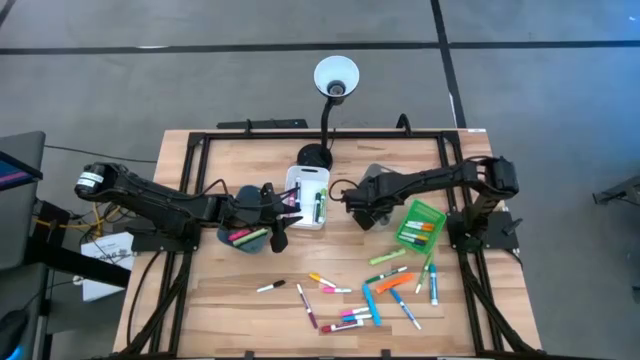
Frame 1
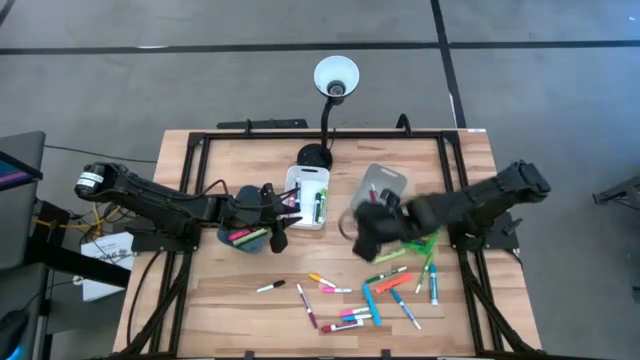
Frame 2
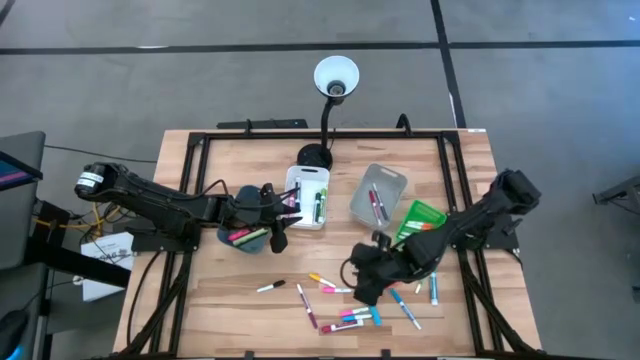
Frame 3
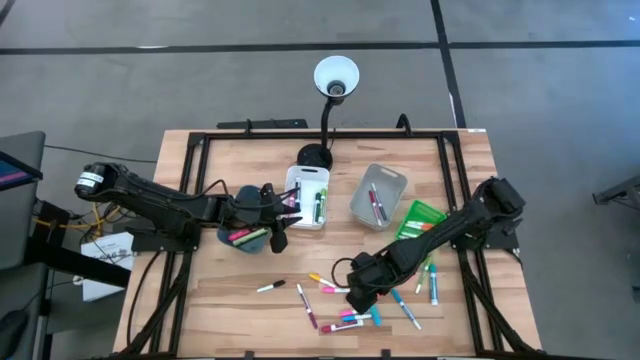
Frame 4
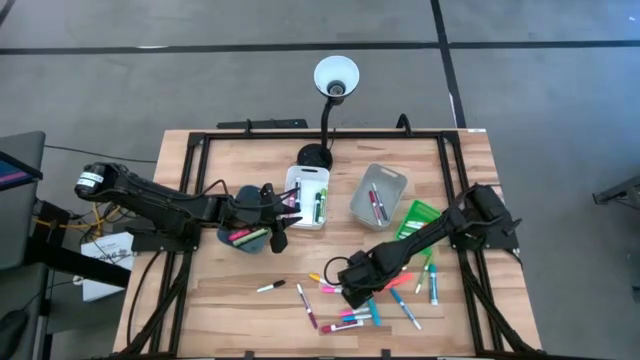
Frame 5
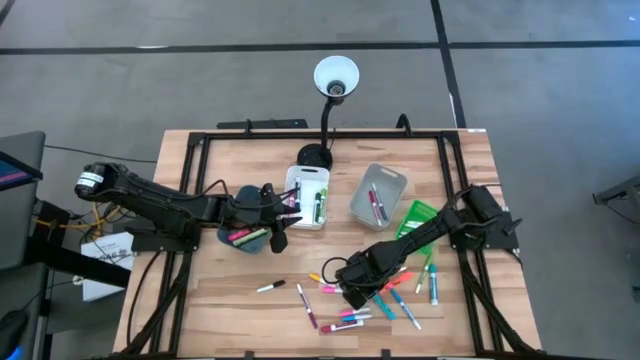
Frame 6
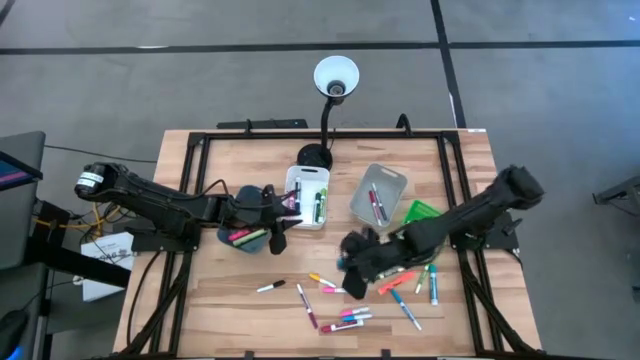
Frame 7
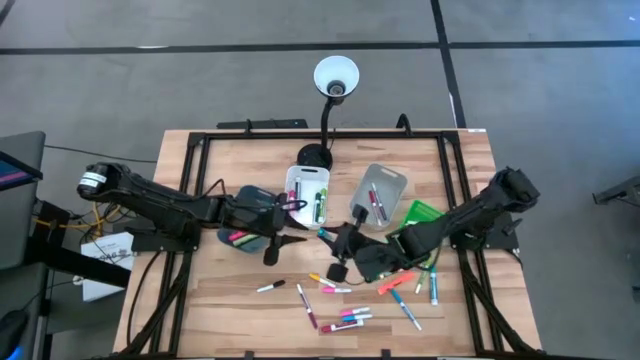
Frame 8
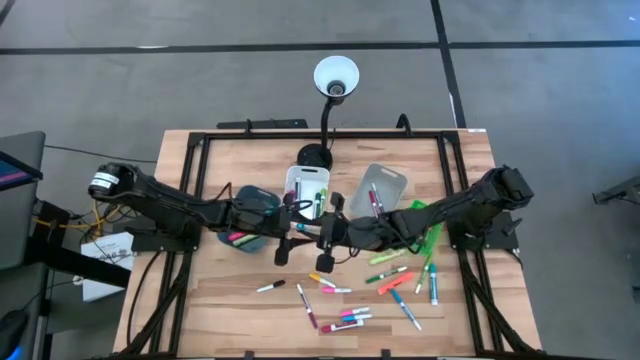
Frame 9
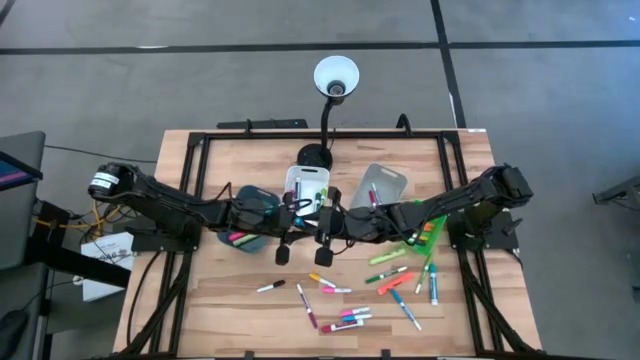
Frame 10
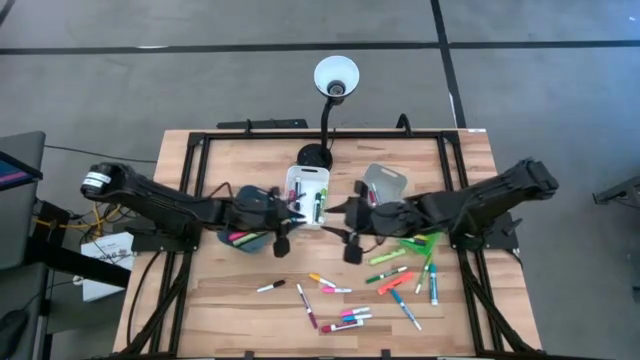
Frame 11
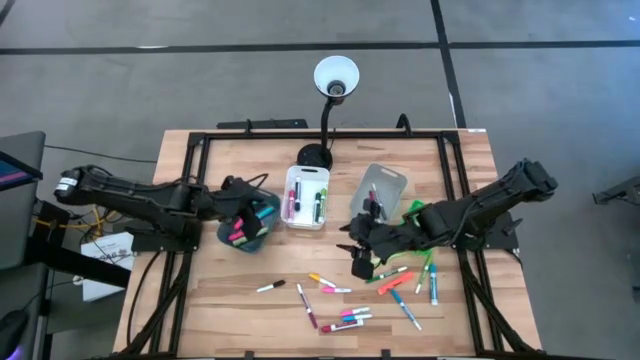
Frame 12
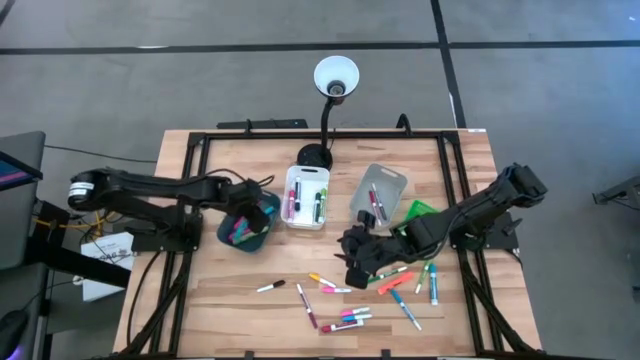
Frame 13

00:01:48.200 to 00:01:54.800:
Task: Pick & Place Markers
Put the light blue highlighter into the blue bin

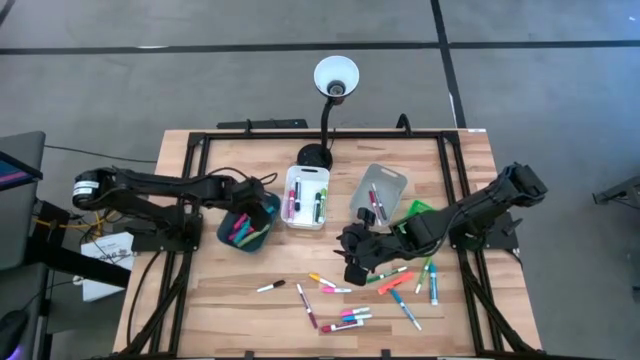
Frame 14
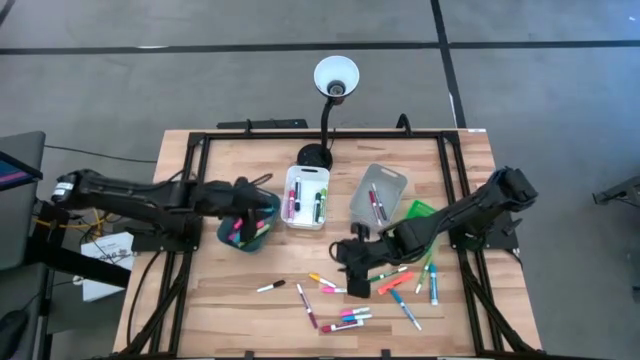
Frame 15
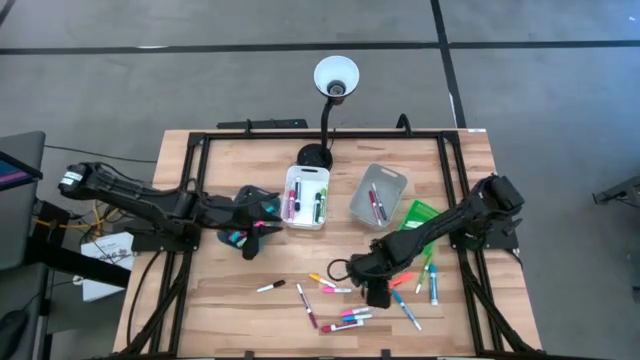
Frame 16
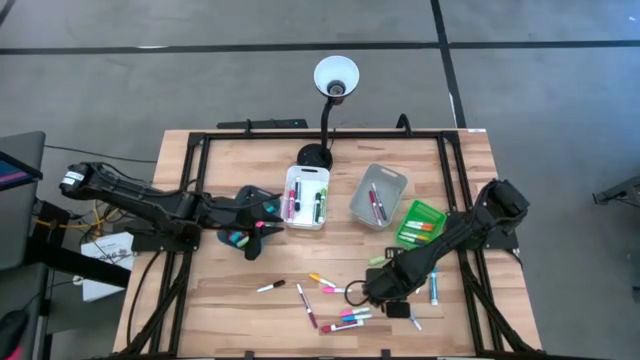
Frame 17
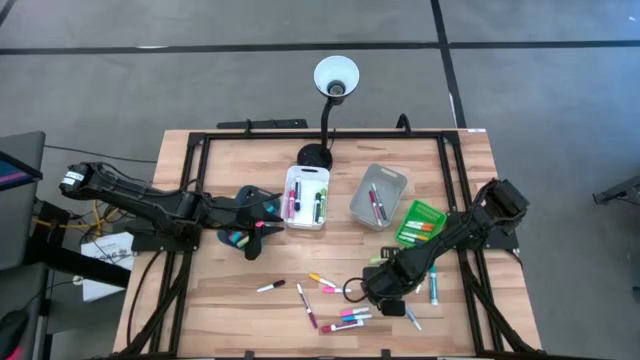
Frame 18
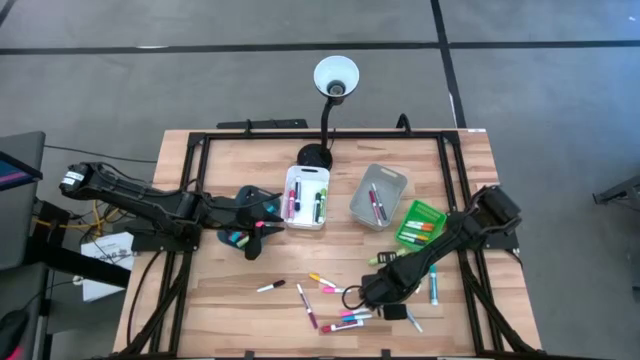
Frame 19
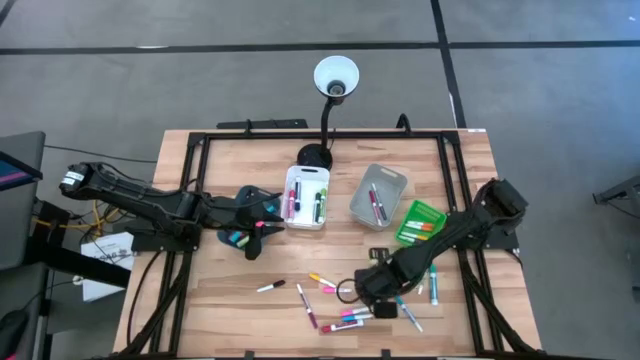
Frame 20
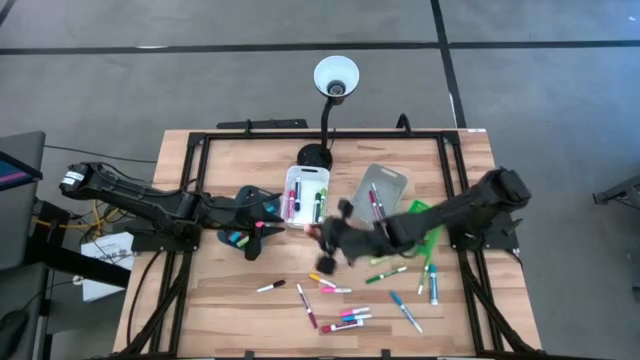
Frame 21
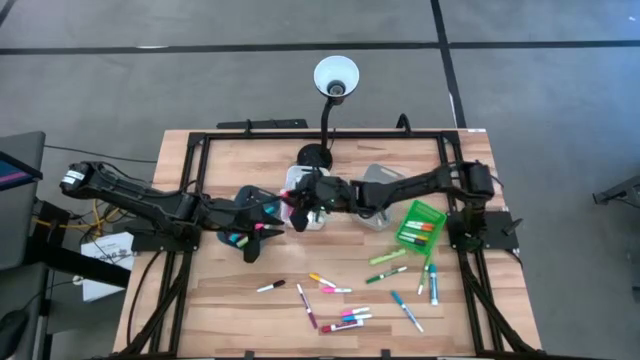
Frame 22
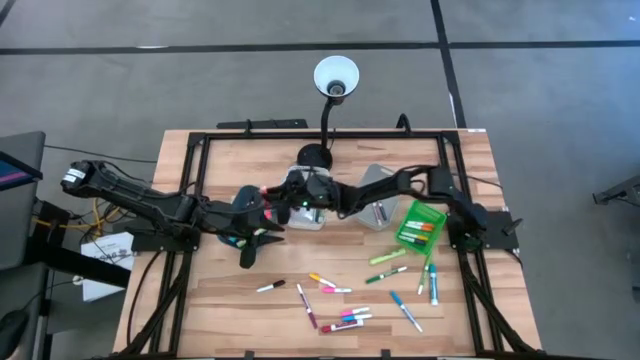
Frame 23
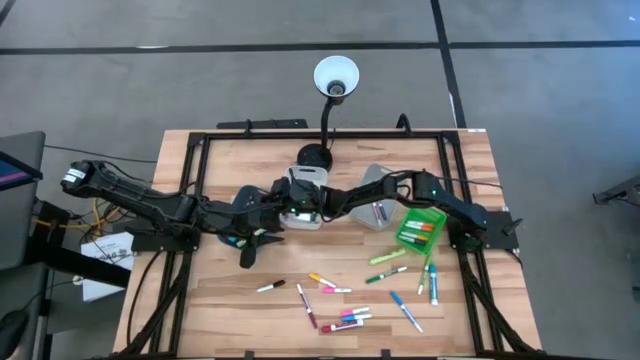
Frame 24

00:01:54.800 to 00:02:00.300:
Put the orange highlighter into the blue bin

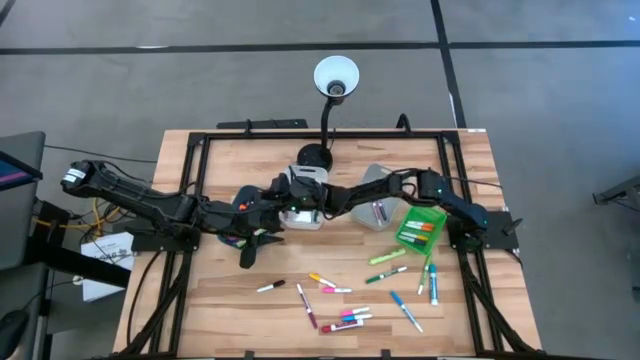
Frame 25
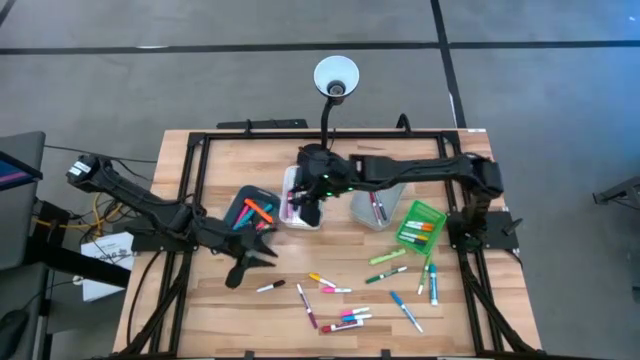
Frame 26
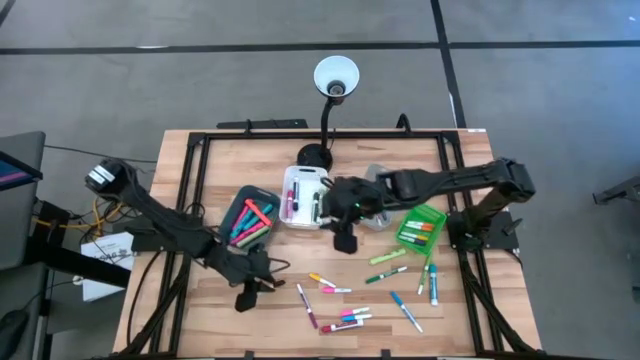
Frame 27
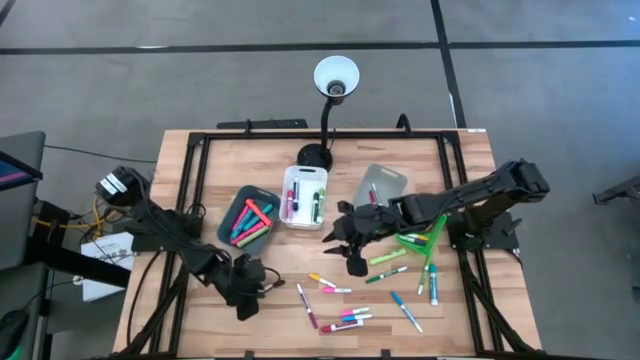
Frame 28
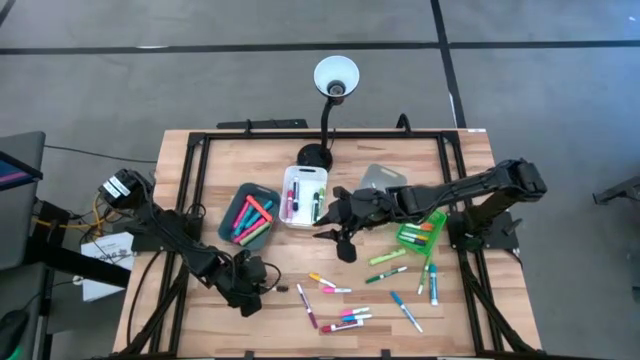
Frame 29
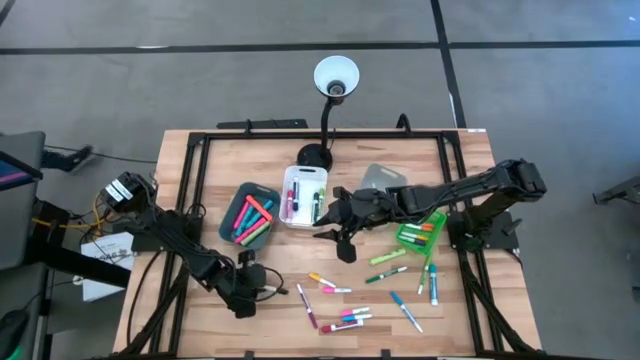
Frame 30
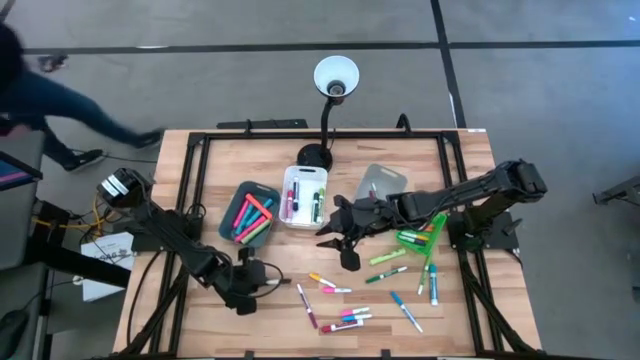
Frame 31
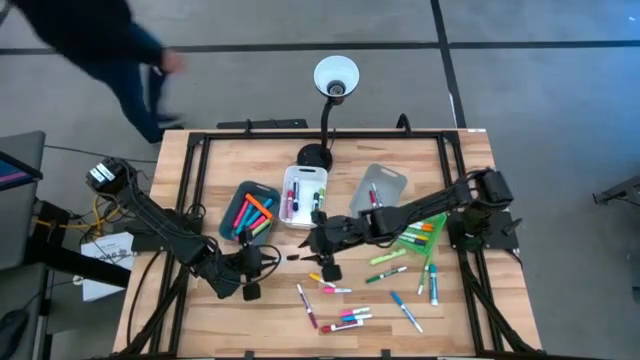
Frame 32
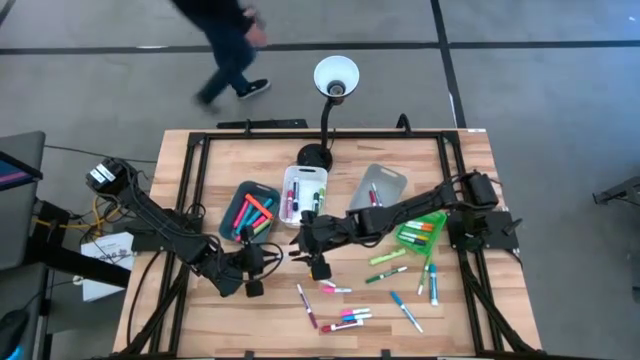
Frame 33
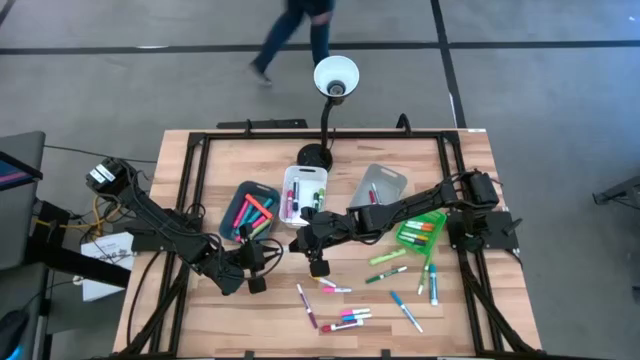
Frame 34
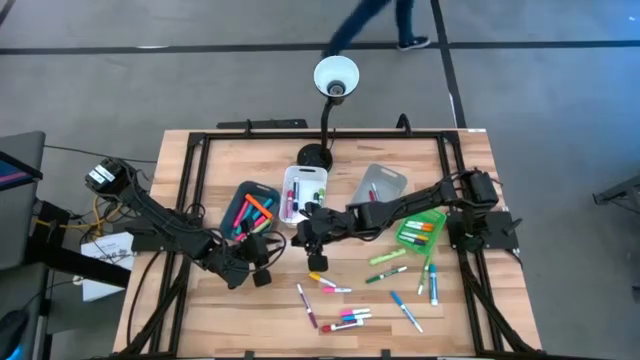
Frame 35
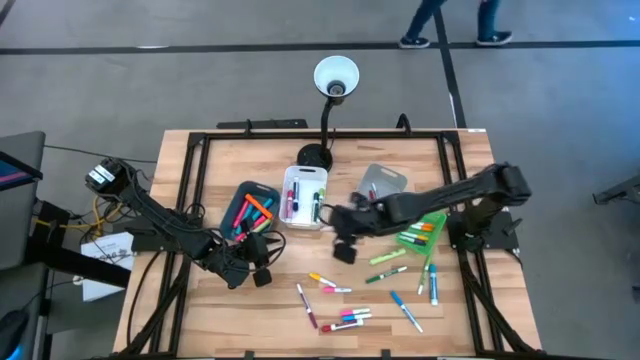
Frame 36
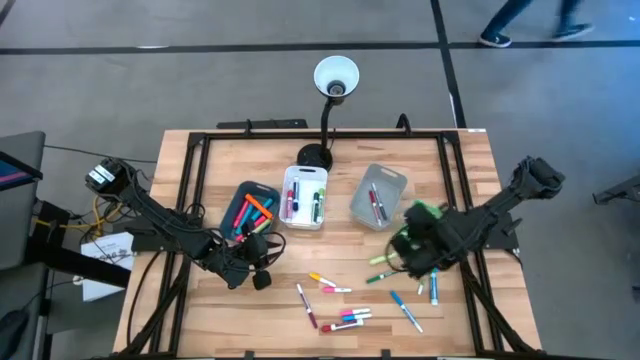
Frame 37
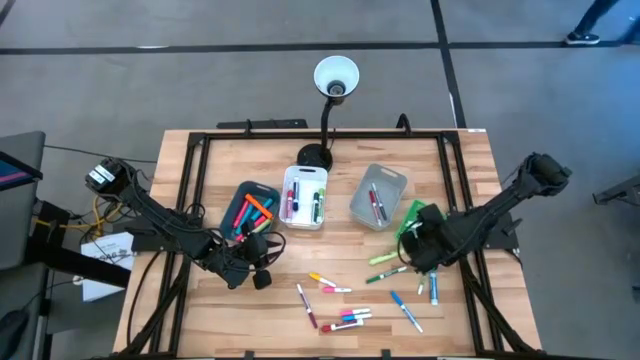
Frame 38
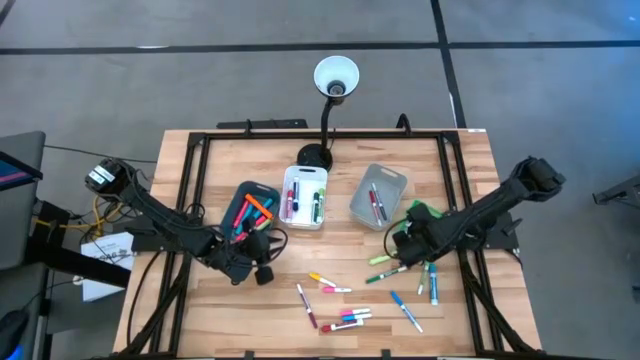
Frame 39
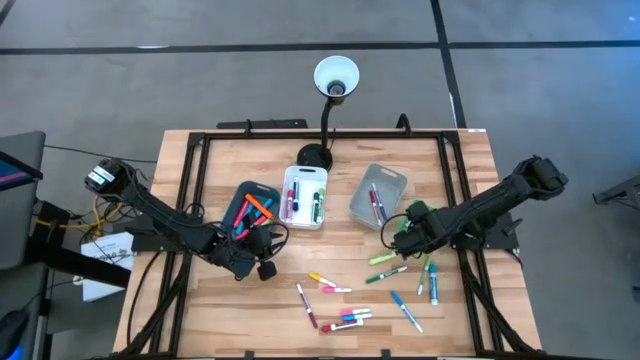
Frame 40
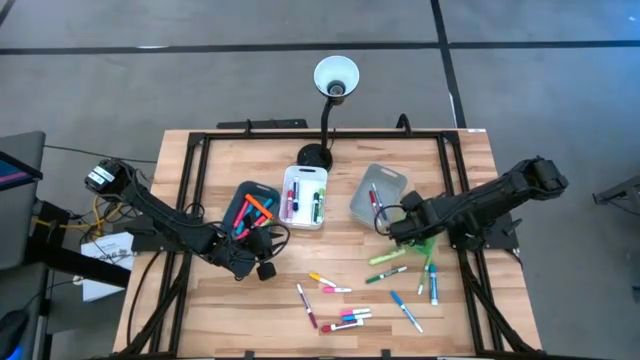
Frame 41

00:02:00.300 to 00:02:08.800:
Put the black mini marker into the green bin
